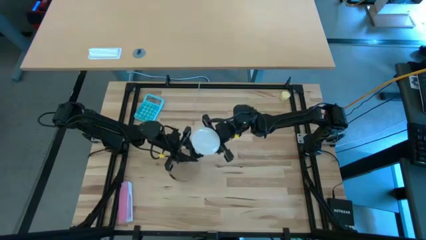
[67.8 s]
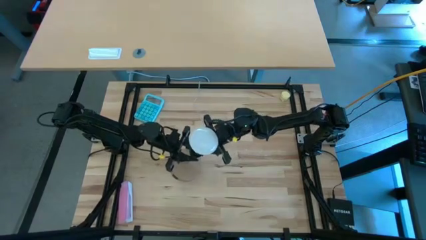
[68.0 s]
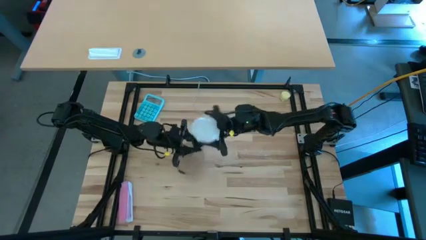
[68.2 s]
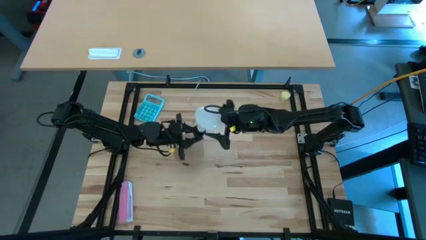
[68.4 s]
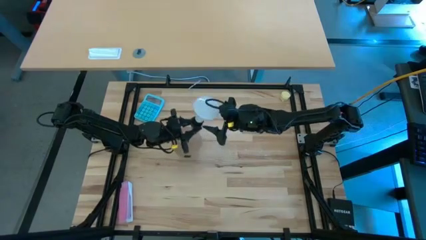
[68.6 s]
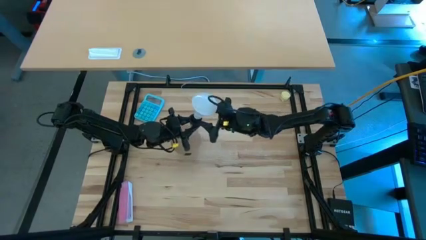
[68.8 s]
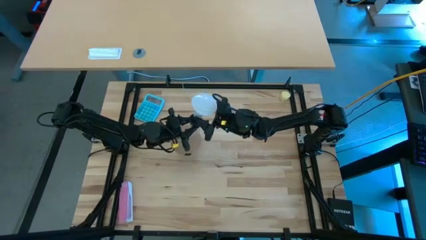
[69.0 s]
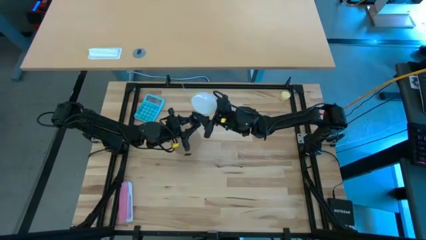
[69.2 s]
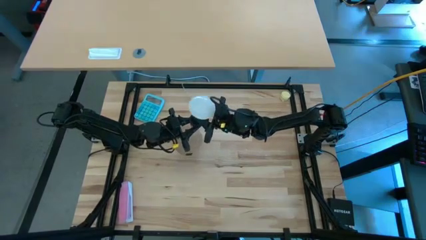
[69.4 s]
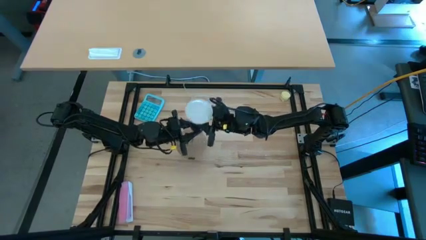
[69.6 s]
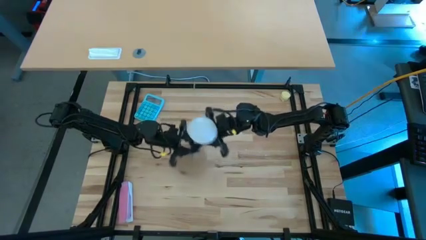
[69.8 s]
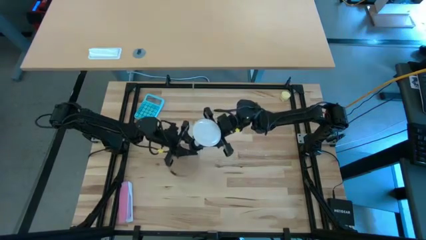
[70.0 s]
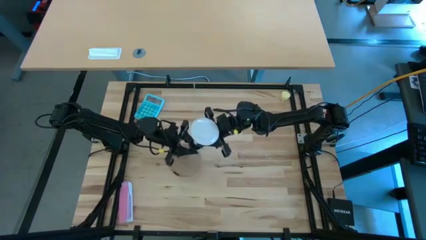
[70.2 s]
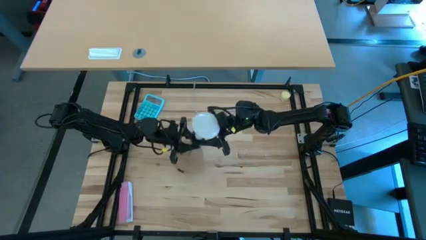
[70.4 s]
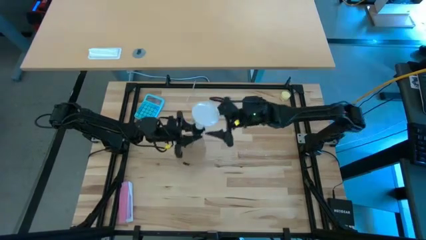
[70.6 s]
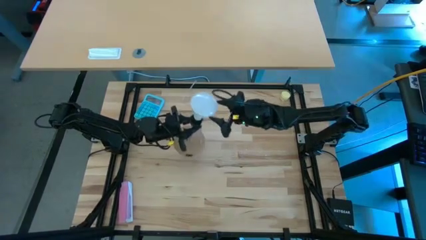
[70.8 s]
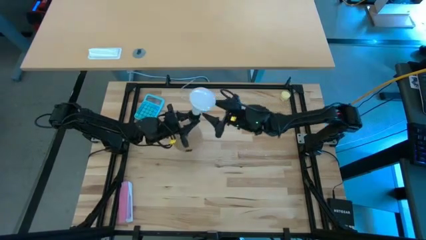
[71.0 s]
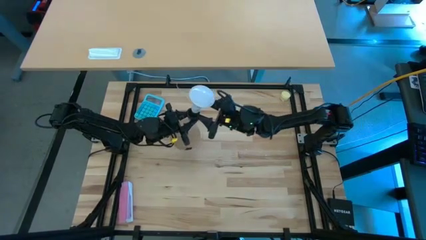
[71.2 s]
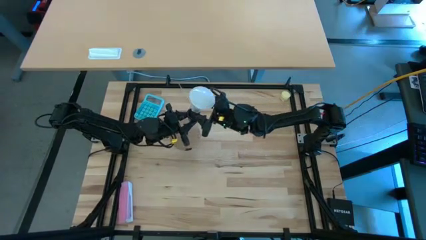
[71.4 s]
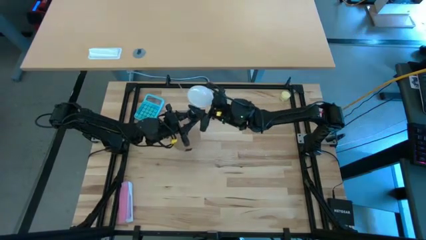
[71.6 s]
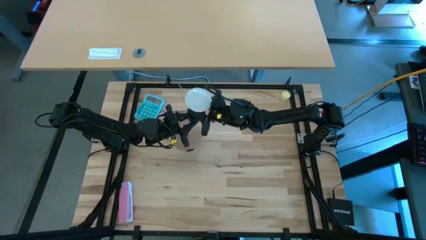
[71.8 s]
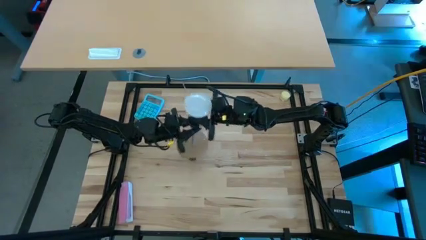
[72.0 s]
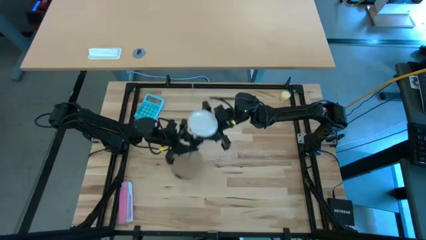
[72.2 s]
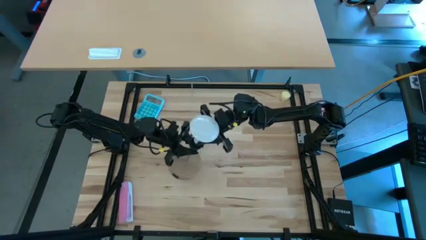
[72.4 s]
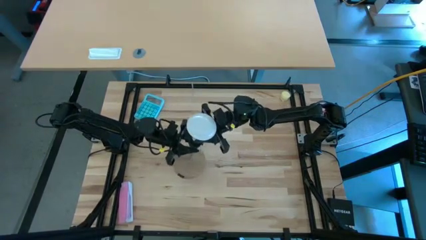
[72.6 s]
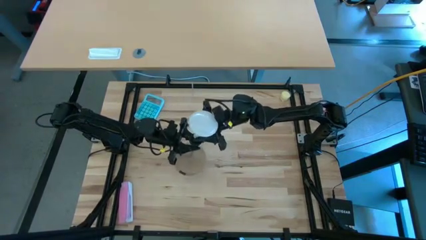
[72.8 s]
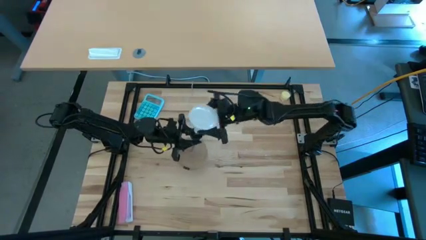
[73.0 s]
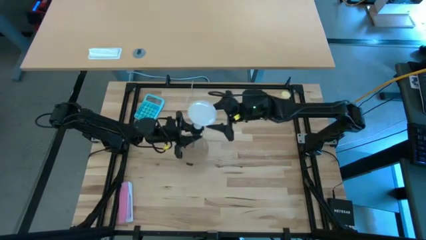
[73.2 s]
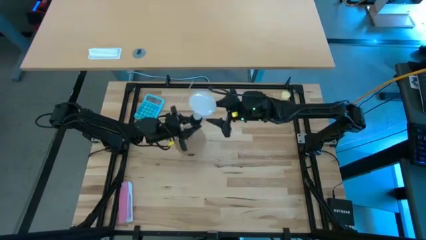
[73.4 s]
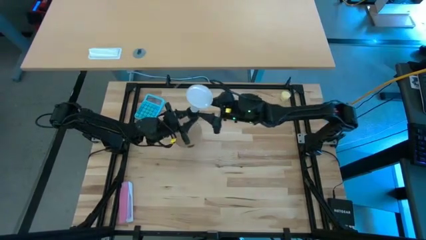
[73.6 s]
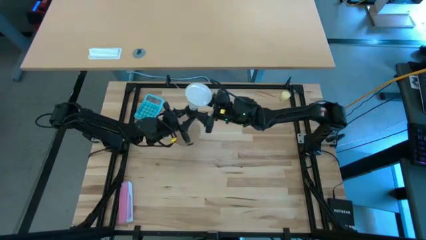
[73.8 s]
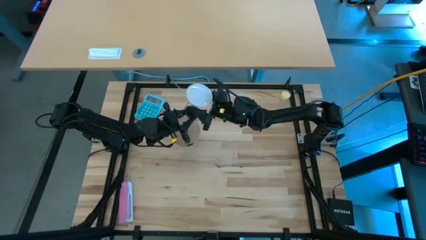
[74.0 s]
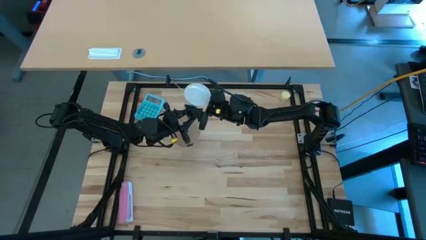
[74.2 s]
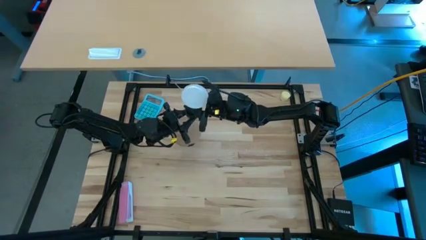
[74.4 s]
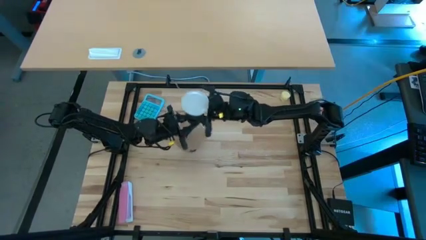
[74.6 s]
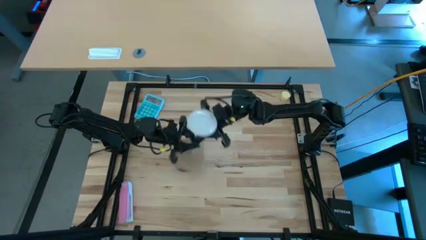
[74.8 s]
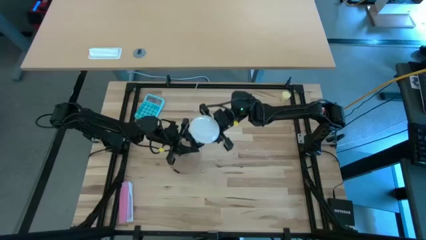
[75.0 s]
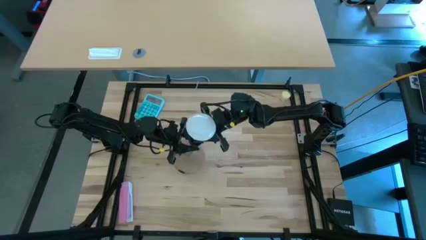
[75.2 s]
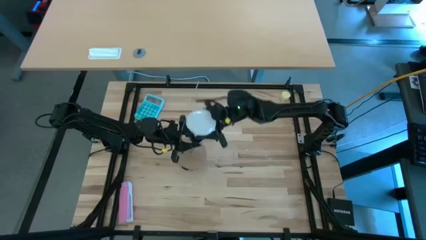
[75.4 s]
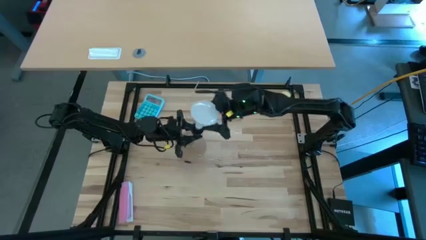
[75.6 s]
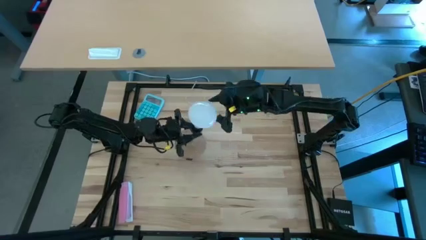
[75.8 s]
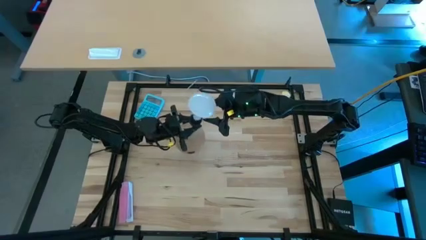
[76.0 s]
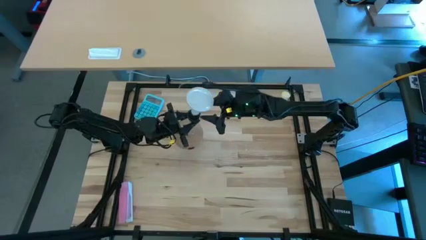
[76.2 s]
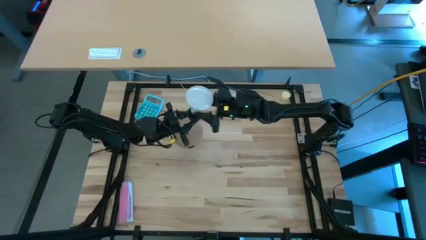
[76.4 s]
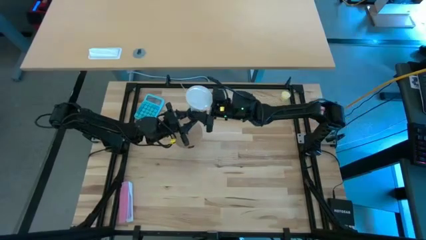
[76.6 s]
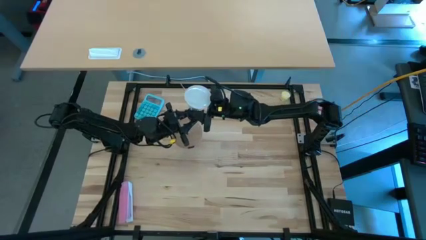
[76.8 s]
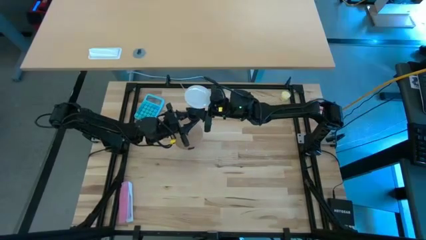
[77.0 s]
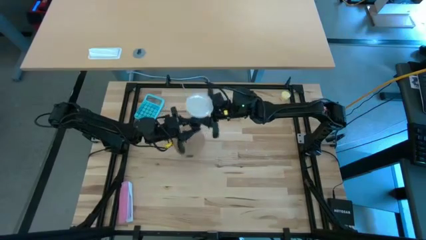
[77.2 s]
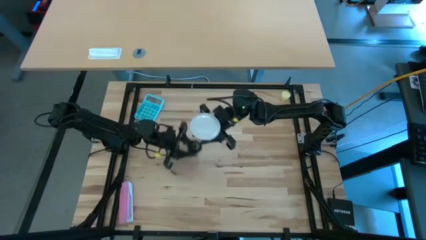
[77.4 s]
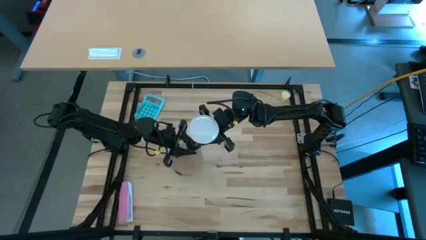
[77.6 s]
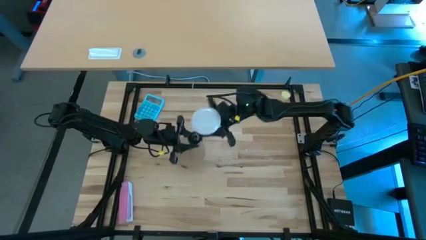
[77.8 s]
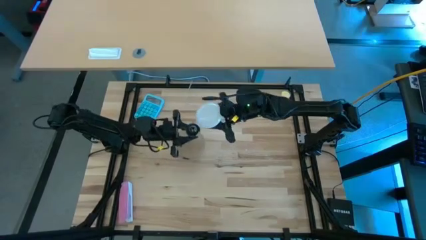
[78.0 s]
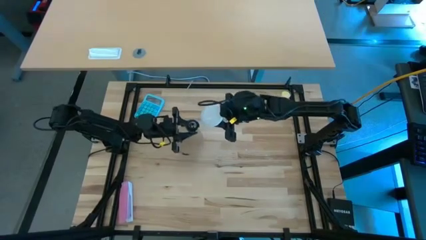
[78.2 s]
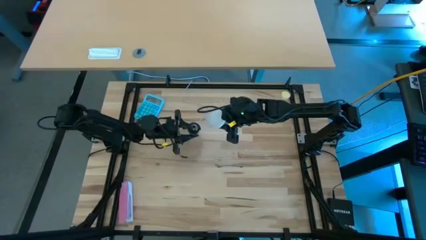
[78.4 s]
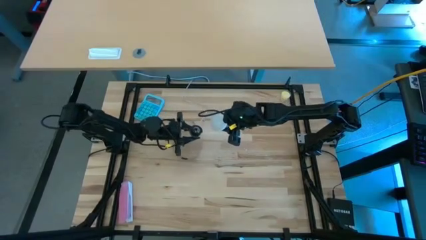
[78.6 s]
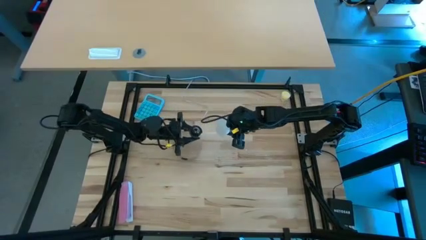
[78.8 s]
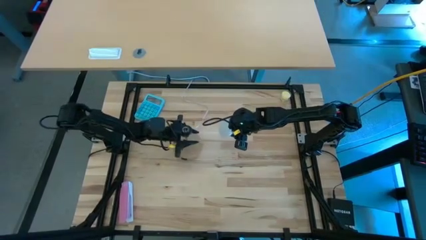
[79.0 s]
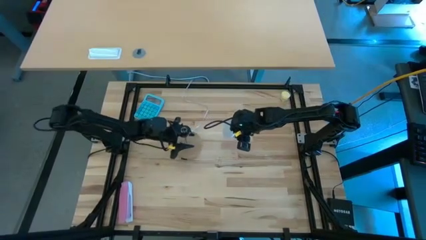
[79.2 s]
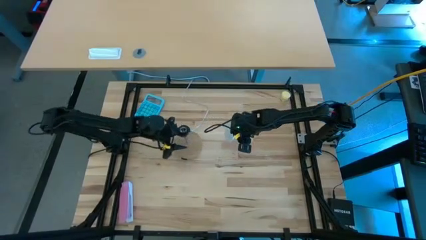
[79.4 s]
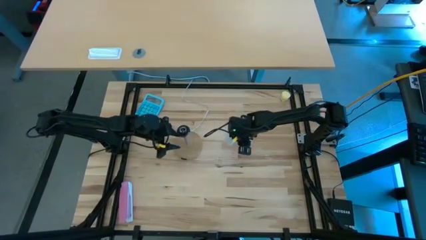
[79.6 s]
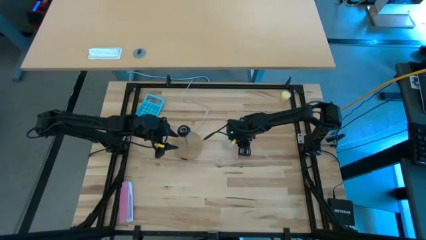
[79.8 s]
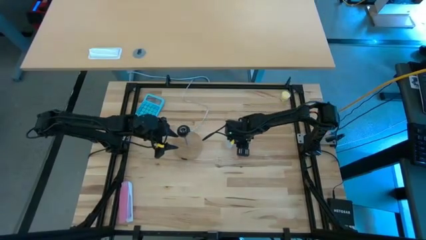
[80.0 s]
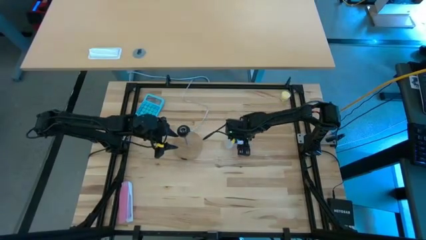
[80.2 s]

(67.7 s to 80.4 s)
Task: Screw lightbulb
Remove the light bulb from the lamp

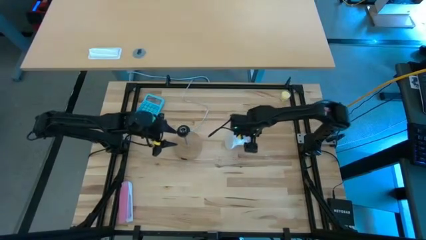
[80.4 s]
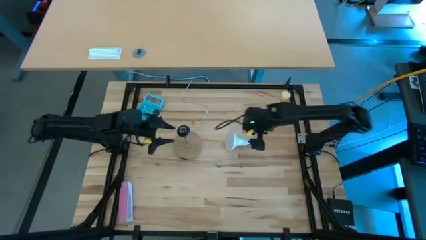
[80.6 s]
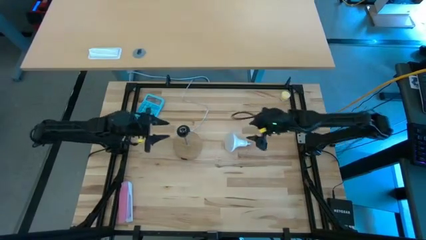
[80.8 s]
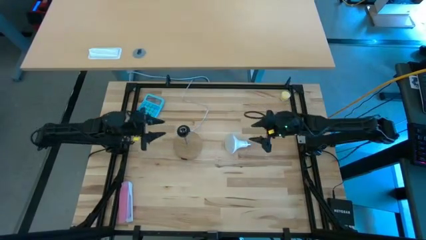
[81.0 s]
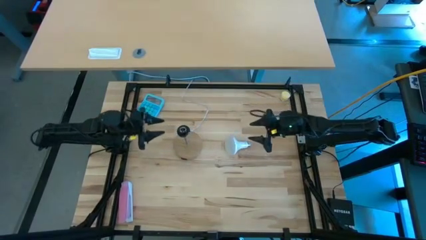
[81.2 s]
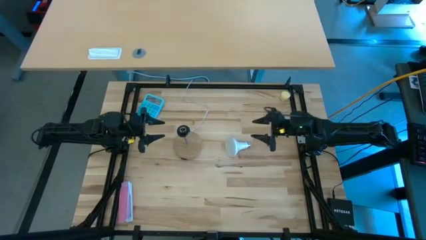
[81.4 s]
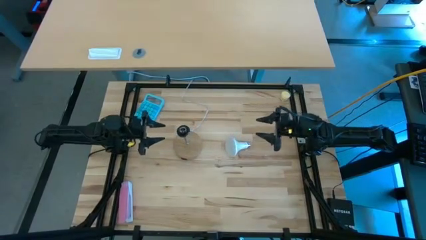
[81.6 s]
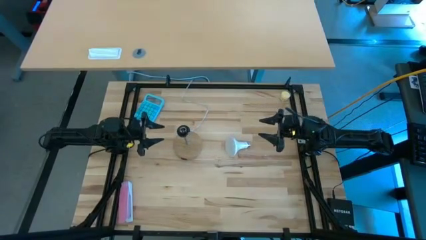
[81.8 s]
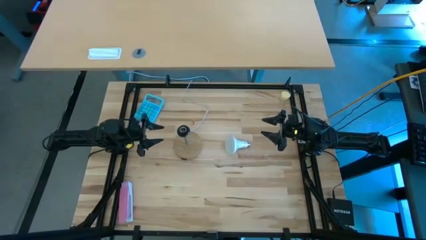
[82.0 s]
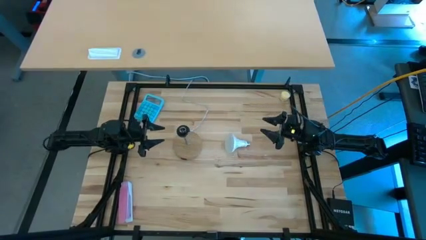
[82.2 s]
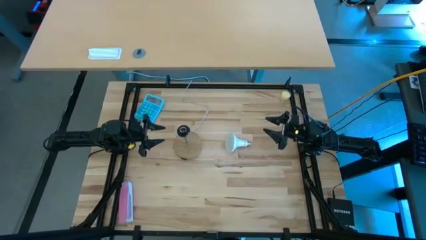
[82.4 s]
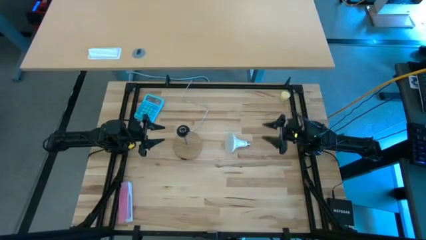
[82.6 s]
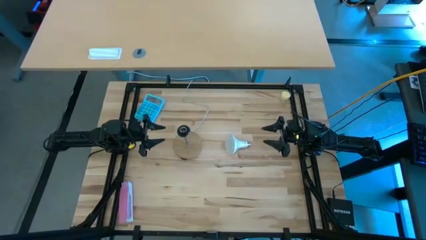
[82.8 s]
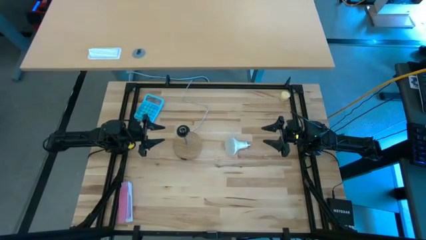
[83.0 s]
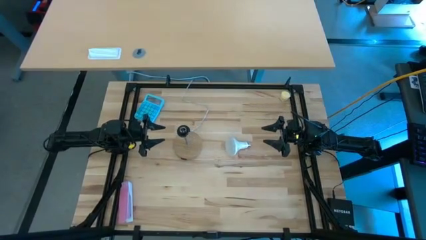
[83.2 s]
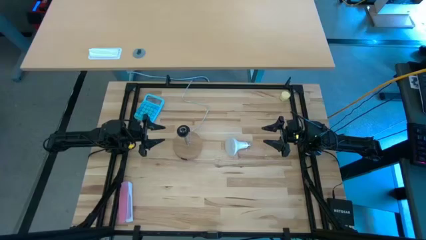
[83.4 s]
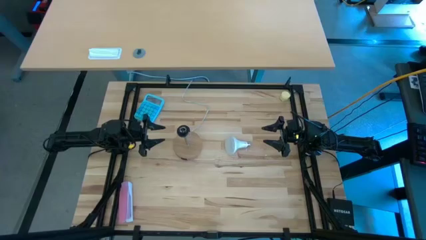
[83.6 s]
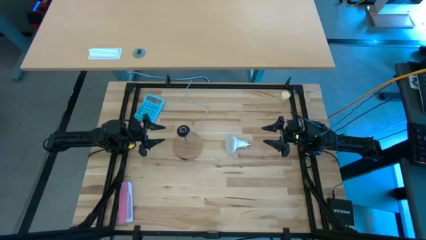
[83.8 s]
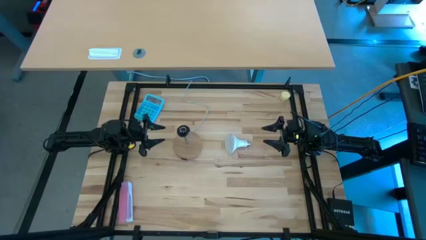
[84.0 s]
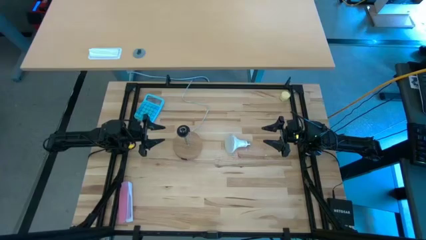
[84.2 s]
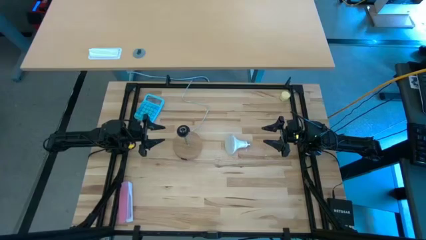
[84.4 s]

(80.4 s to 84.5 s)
Return to Home Position
